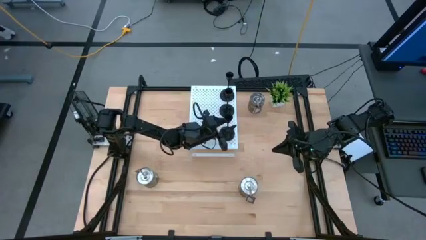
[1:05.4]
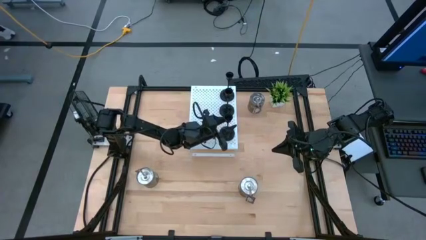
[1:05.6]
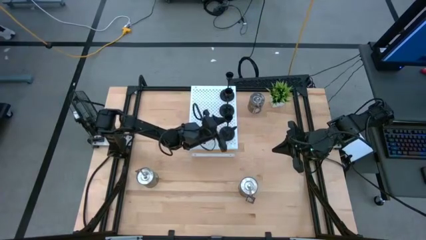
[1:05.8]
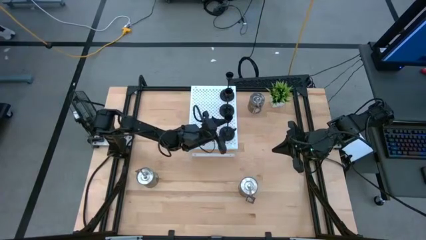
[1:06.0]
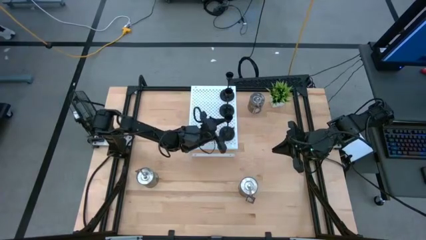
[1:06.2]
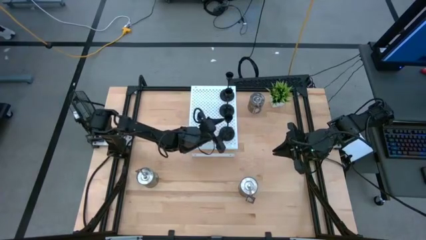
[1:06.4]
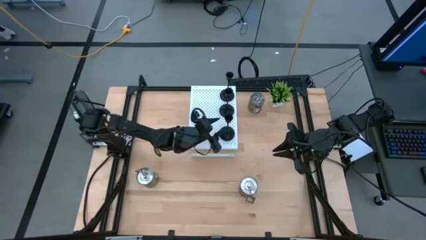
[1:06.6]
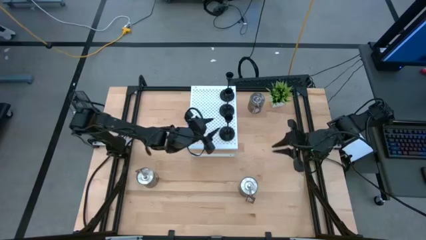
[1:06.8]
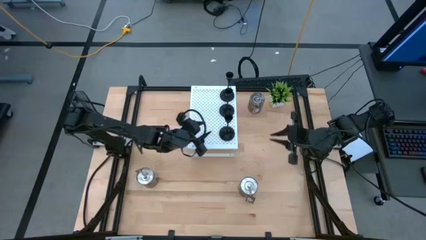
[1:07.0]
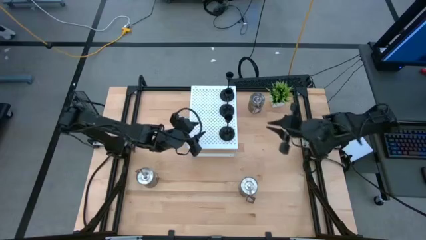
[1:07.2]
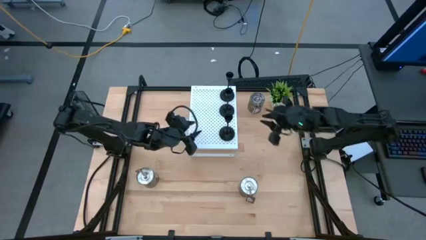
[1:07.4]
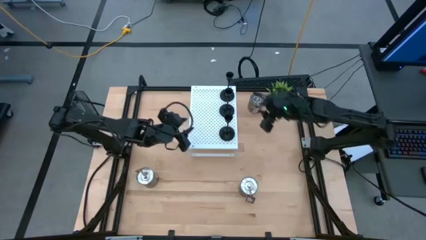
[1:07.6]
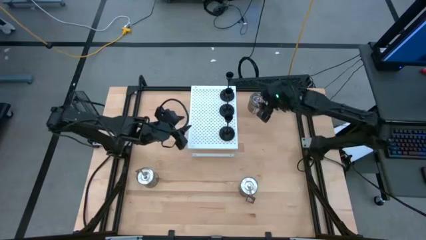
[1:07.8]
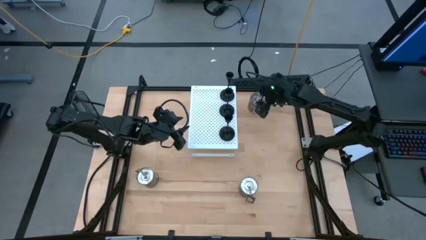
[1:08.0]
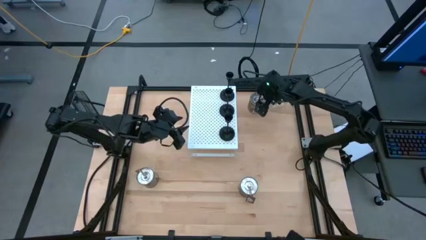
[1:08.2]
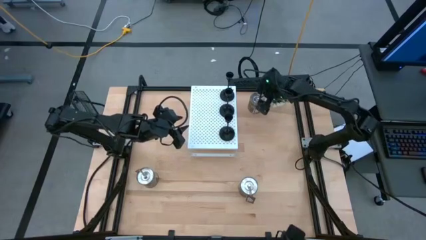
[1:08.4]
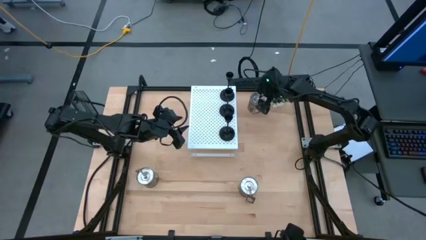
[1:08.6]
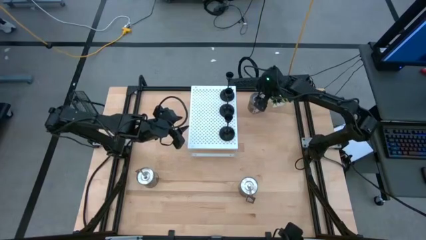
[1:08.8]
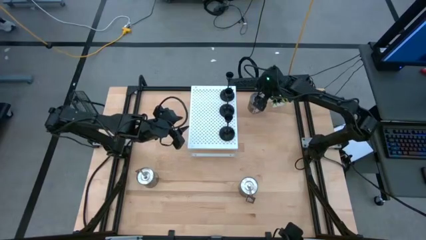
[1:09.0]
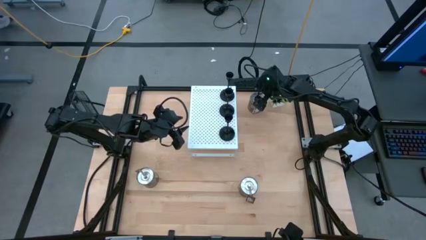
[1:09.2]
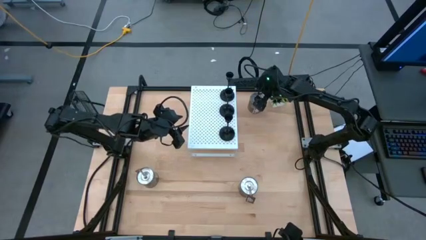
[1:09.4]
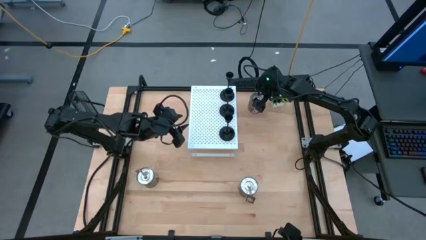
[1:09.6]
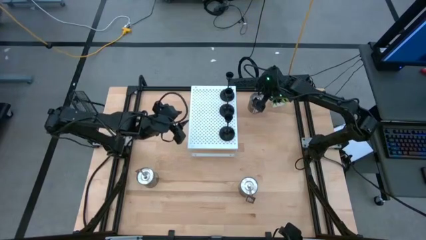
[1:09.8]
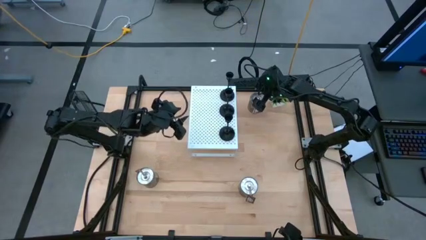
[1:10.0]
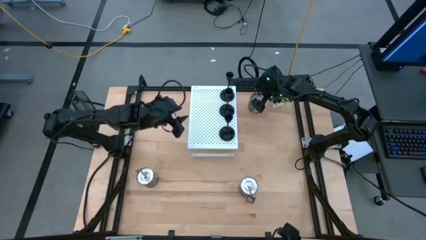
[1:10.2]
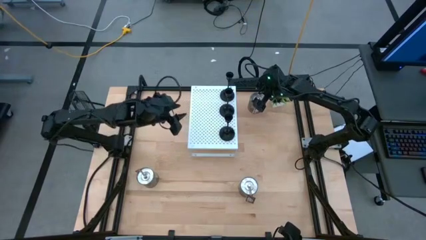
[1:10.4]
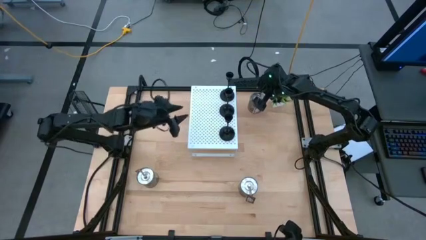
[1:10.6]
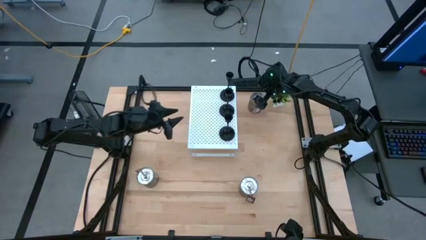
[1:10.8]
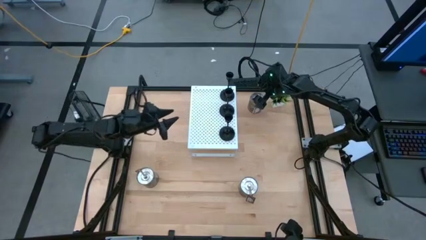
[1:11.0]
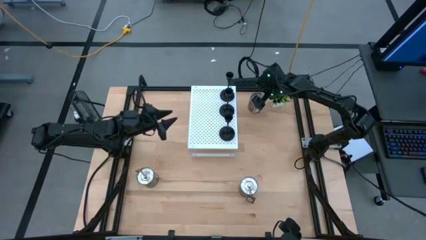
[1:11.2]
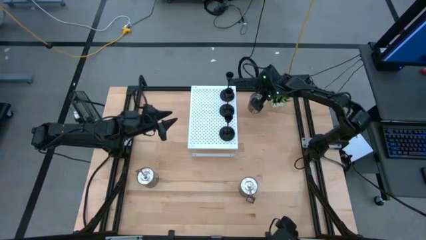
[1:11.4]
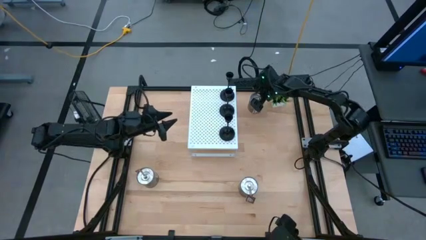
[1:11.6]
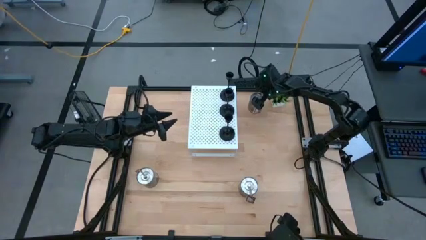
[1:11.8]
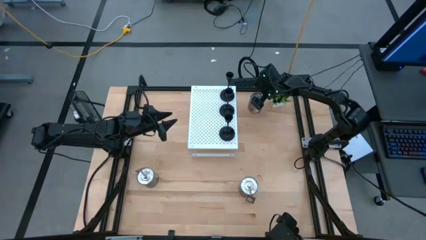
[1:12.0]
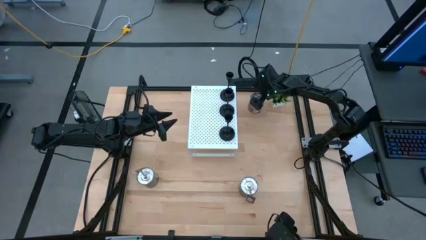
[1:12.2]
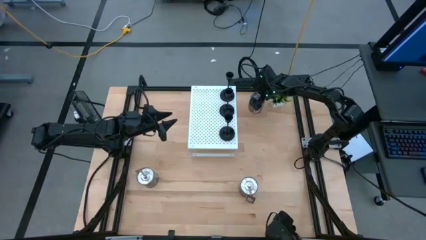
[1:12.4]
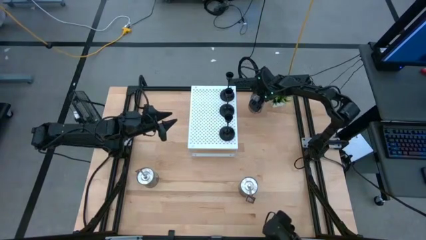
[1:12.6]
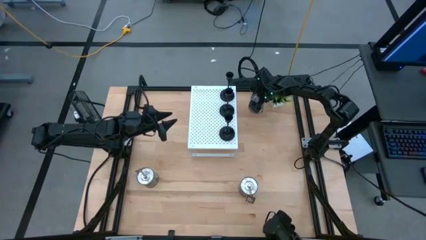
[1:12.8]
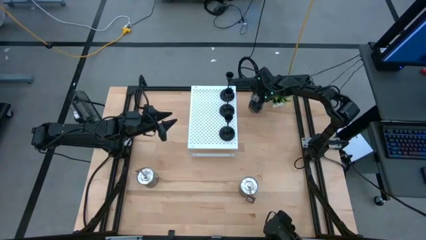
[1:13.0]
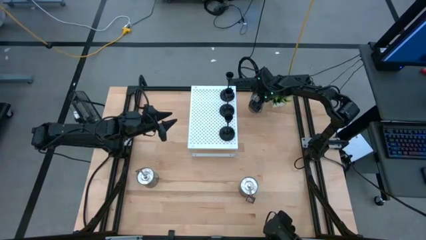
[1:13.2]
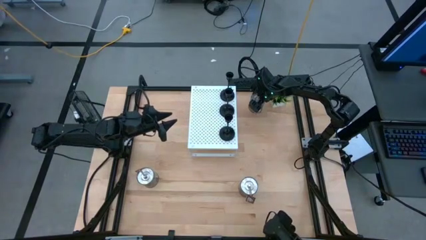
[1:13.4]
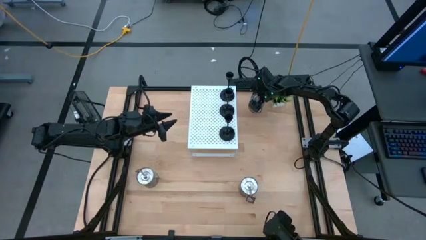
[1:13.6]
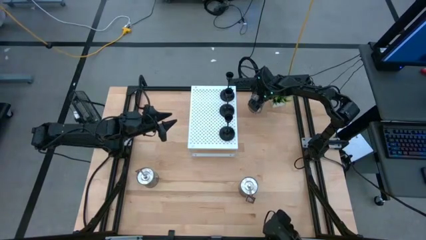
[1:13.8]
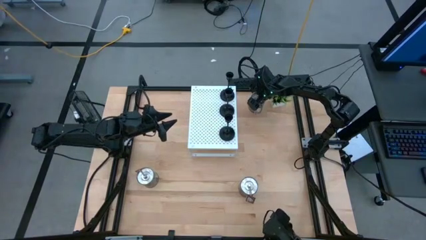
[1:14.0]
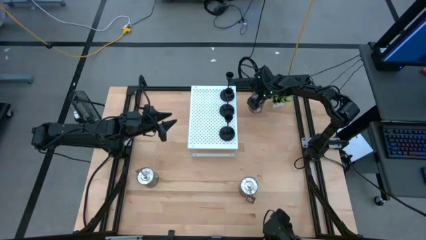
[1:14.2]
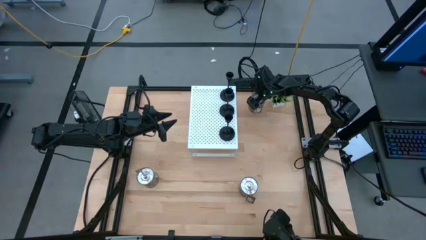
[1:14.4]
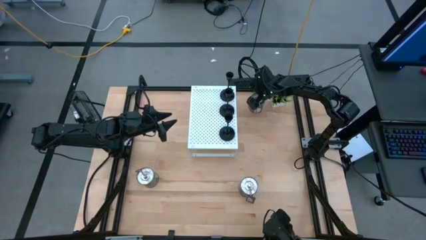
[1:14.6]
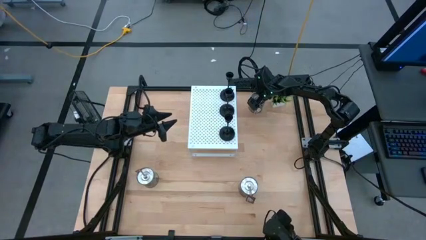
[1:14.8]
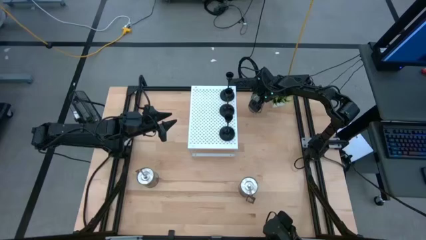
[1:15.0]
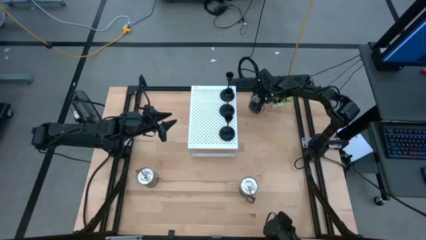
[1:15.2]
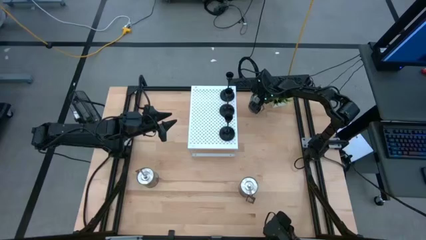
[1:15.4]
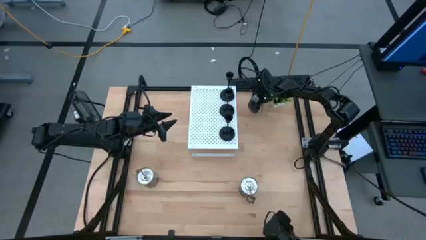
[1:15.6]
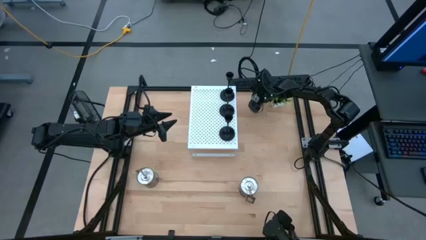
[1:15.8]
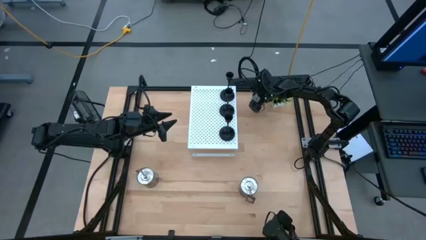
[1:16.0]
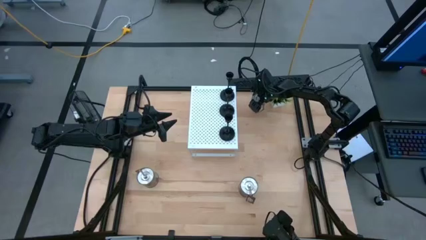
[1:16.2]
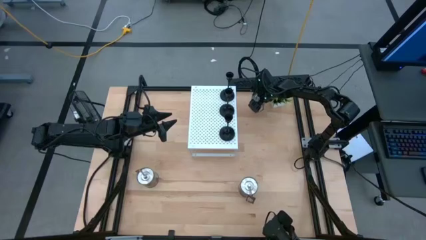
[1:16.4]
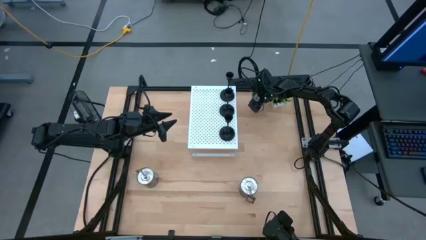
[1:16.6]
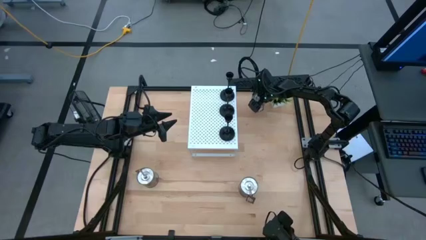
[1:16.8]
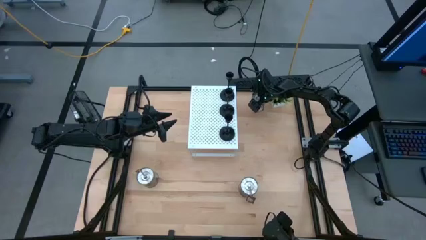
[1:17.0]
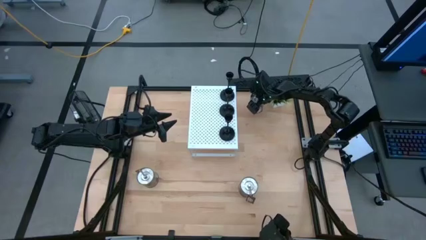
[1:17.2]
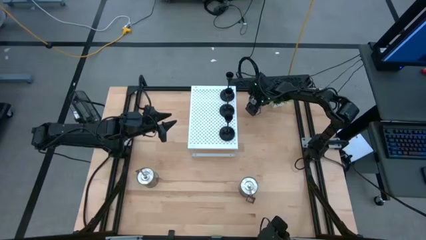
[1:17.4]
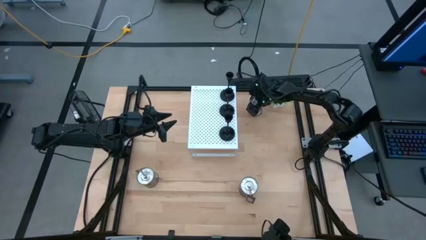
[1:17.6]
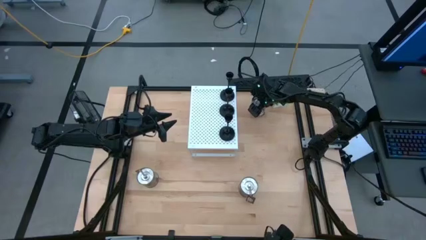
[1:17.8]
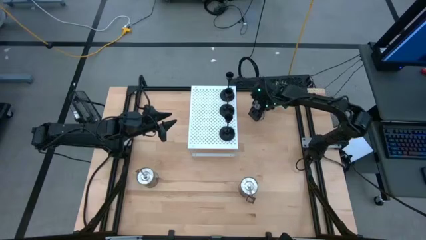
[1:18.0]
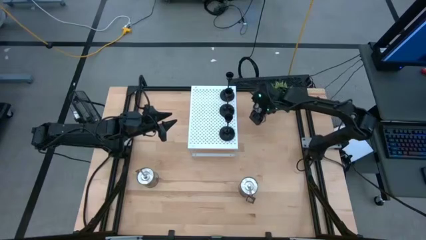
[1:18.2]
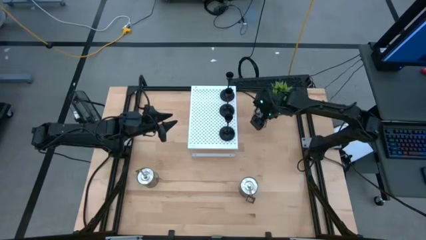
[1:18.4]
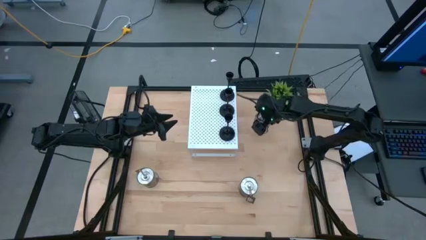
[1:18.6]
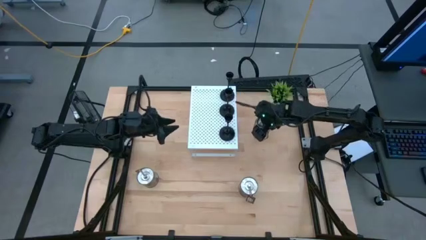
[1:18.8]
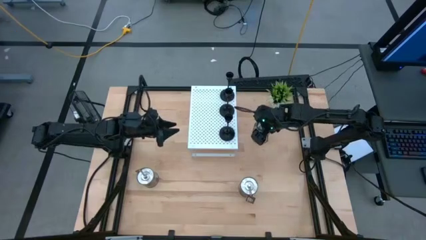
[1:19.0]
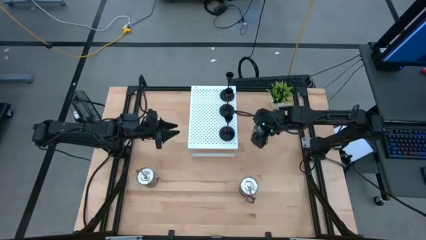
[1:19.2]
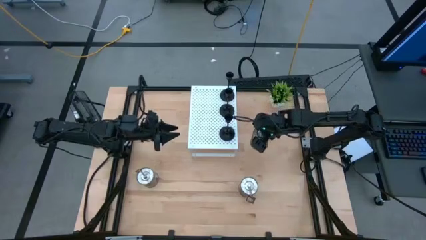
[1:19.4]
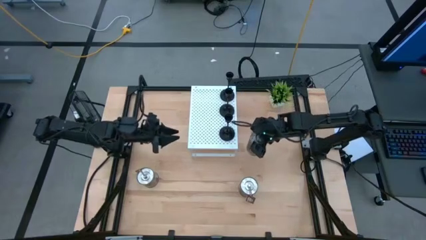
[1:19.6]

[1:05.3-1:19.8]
Task: Pick & Place candle stick holders
Put the top right silver scented candle on the shelf

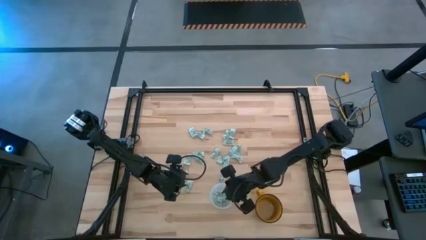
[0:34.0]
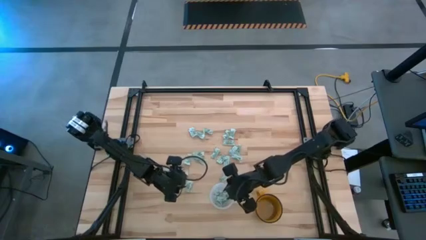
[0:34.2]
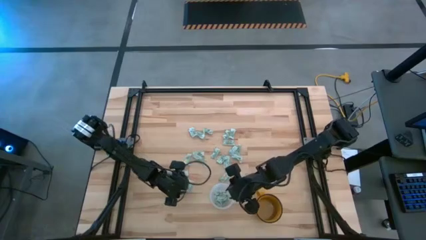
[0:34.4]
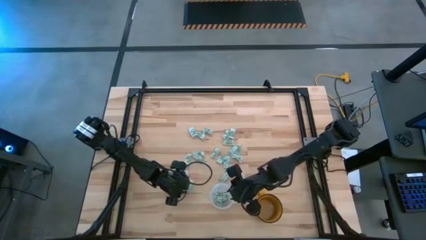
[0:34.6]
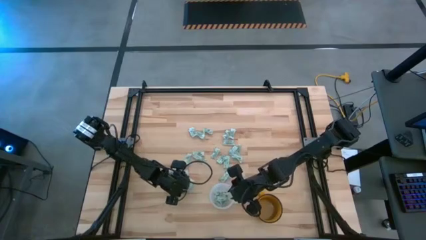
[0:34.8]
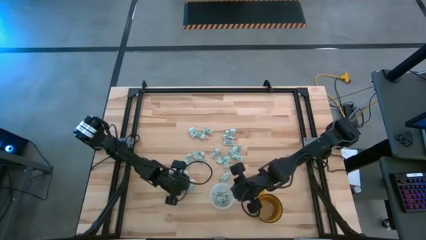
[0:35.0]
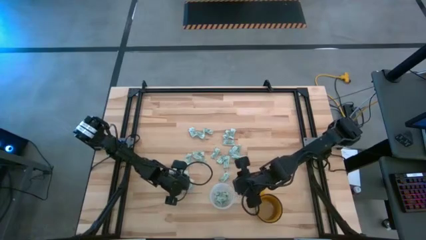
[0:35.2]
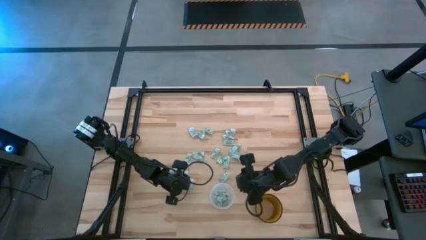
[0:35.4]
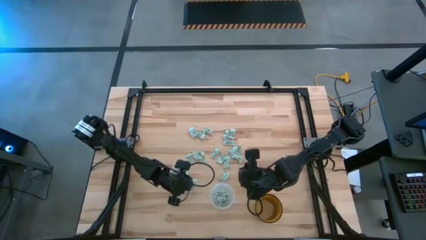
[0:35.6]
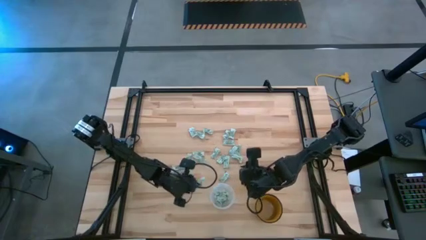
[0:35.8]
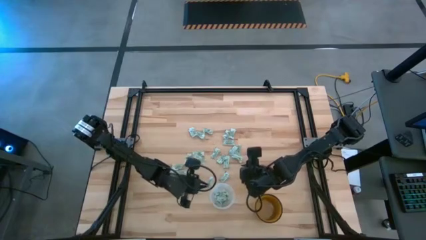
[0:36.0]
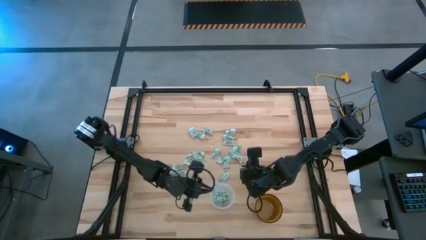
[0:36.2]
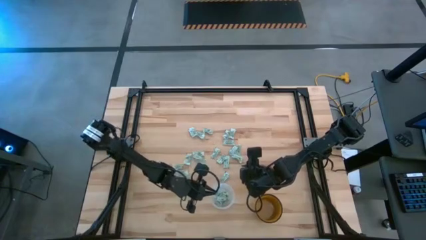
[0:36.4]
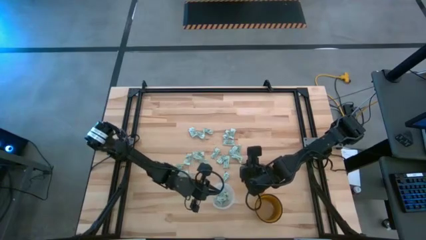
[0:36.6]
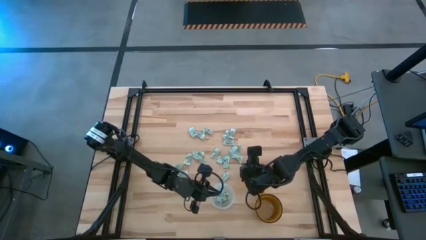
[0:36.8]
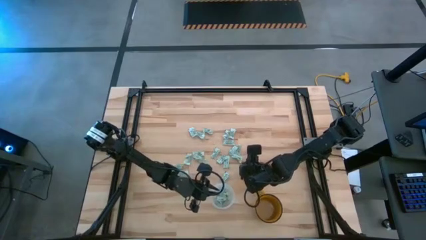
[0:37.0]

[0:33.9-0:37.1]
Task: Pick and place Stevia / Truvia into bins
Put the stevia packet into the transparent bin
